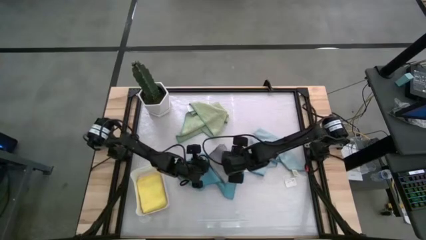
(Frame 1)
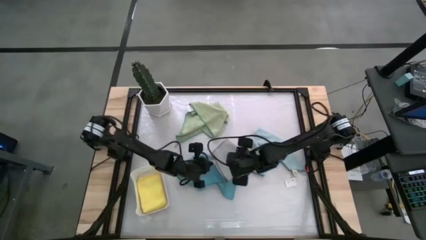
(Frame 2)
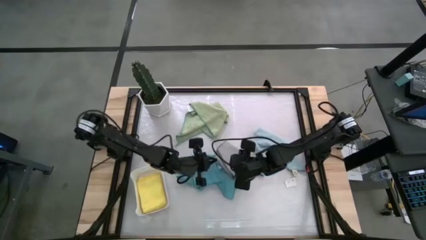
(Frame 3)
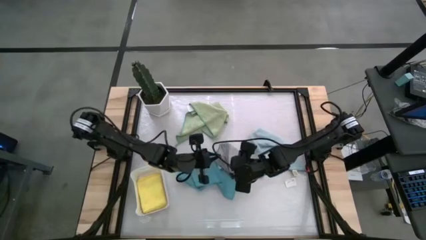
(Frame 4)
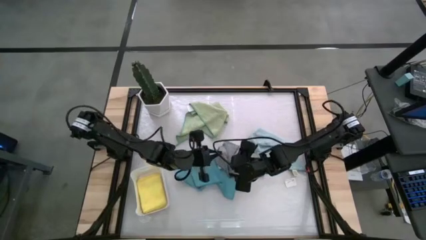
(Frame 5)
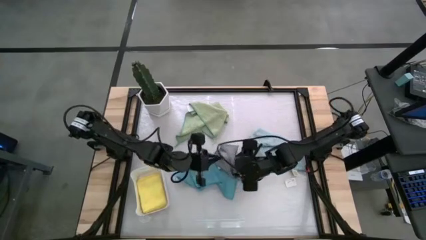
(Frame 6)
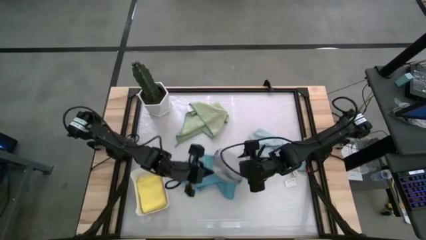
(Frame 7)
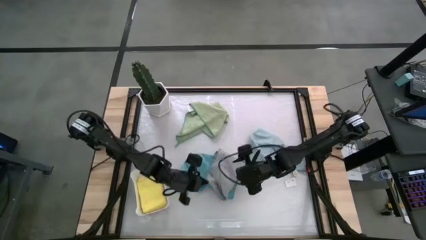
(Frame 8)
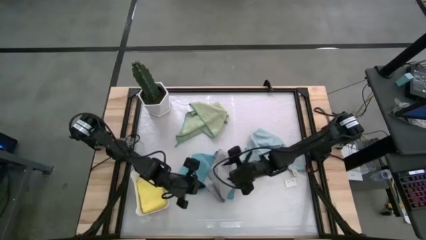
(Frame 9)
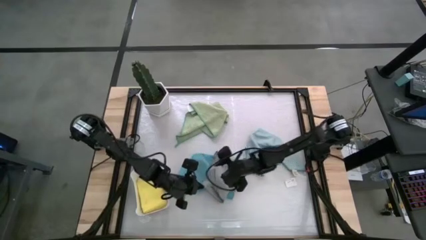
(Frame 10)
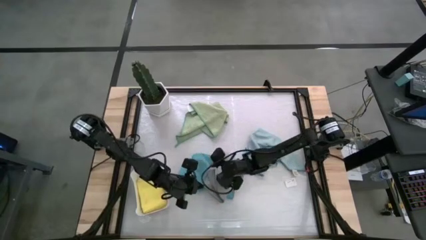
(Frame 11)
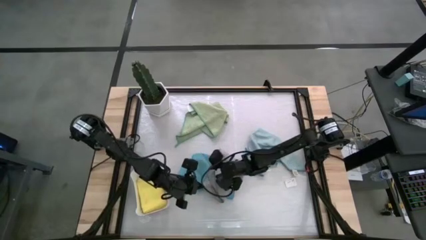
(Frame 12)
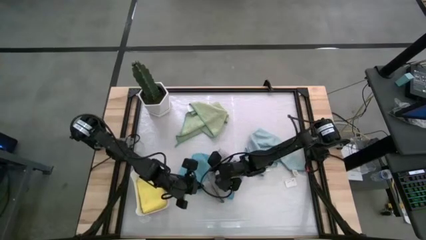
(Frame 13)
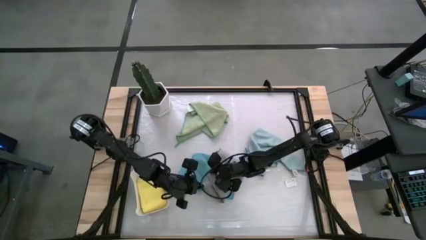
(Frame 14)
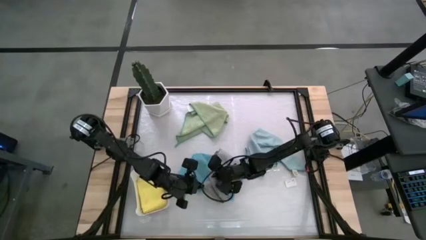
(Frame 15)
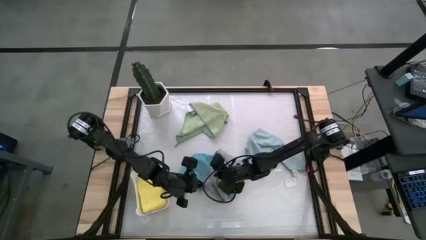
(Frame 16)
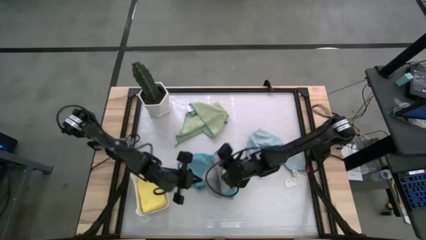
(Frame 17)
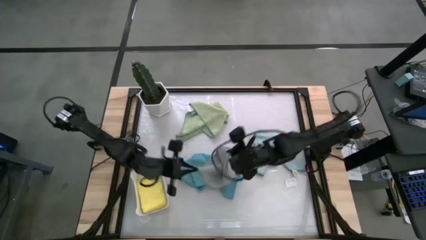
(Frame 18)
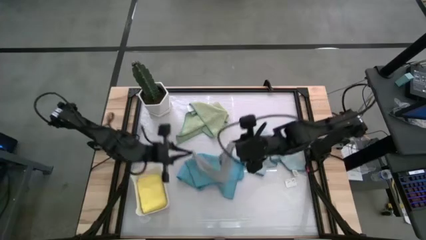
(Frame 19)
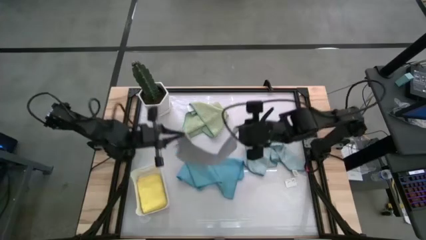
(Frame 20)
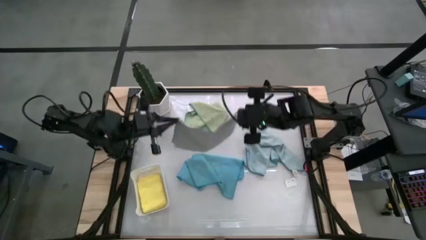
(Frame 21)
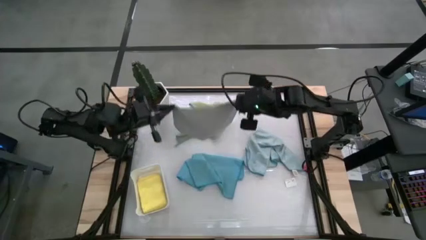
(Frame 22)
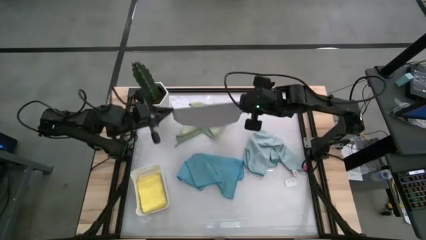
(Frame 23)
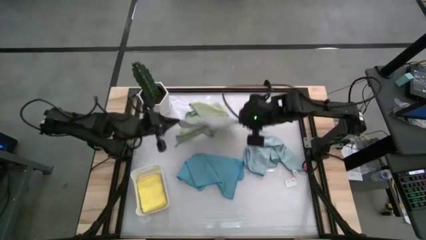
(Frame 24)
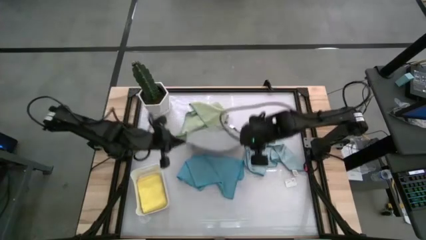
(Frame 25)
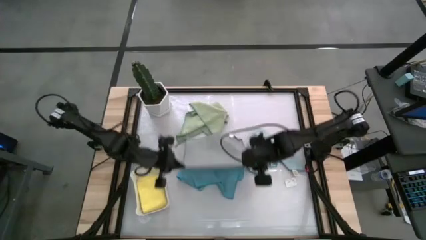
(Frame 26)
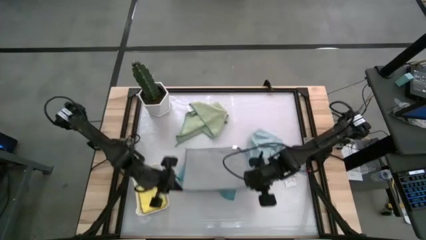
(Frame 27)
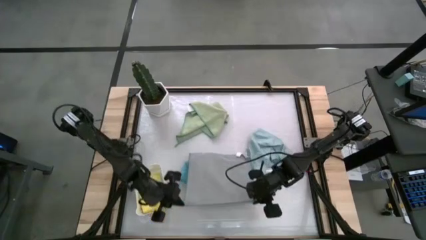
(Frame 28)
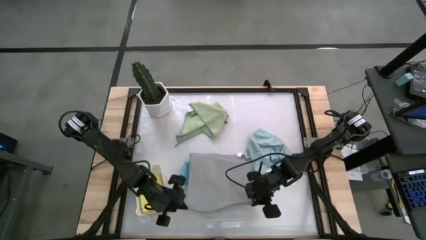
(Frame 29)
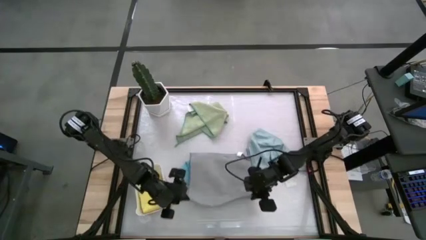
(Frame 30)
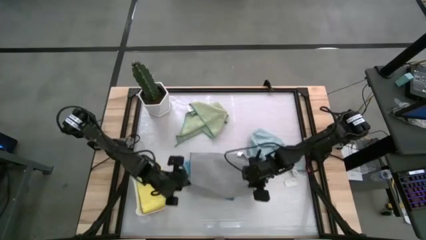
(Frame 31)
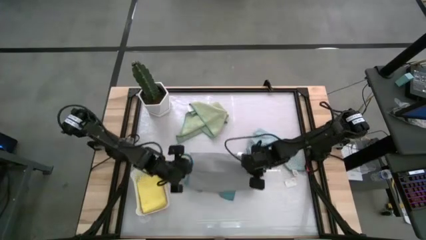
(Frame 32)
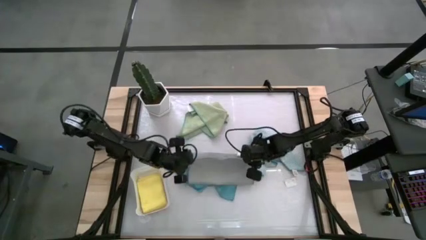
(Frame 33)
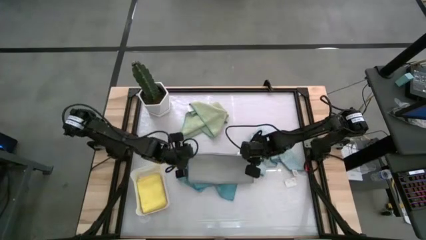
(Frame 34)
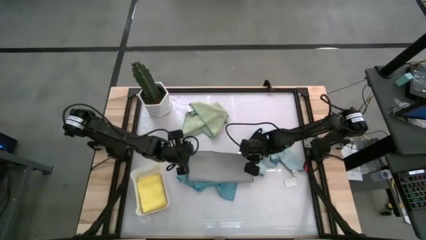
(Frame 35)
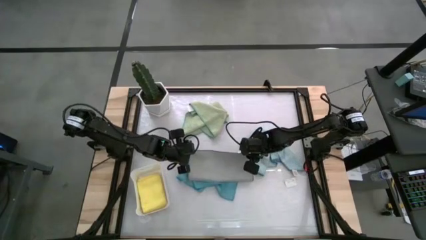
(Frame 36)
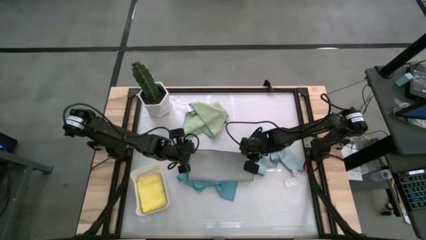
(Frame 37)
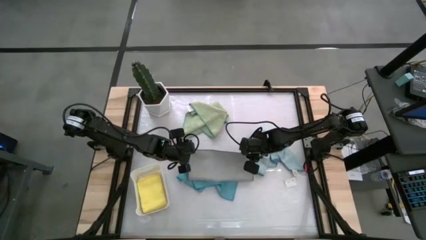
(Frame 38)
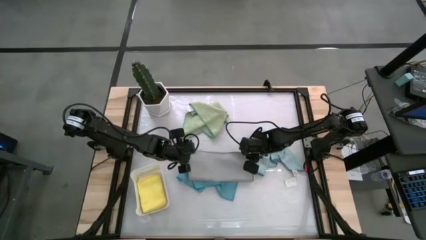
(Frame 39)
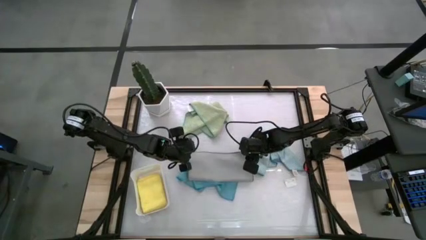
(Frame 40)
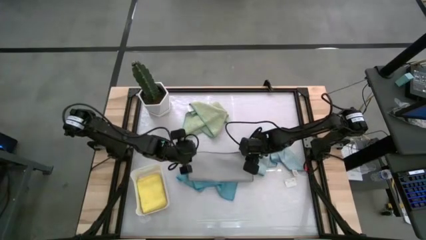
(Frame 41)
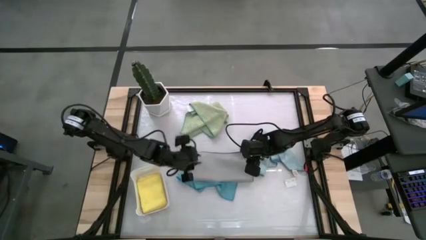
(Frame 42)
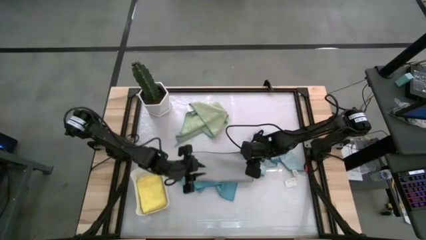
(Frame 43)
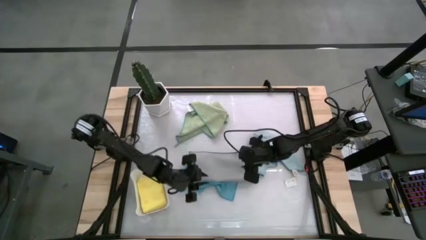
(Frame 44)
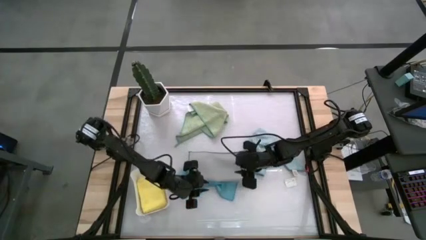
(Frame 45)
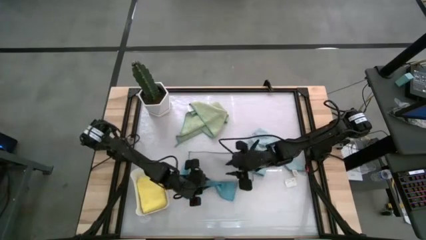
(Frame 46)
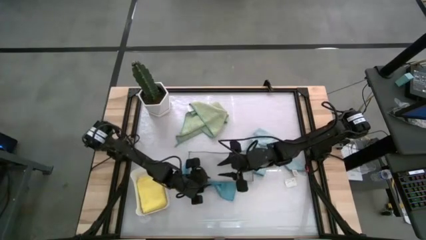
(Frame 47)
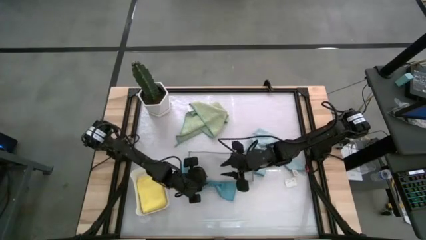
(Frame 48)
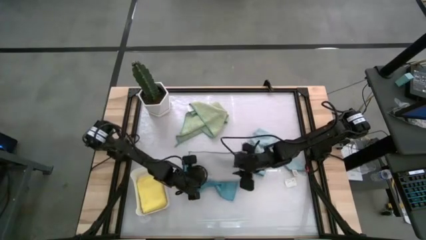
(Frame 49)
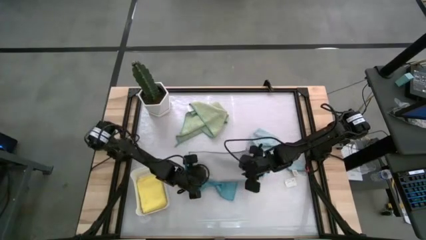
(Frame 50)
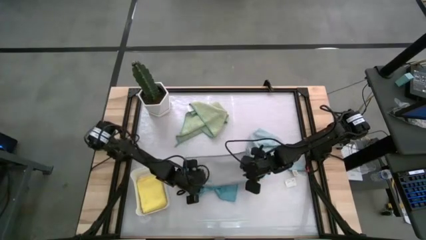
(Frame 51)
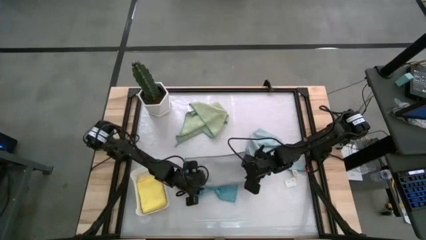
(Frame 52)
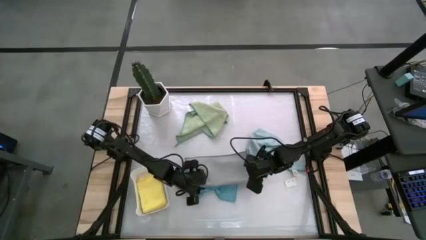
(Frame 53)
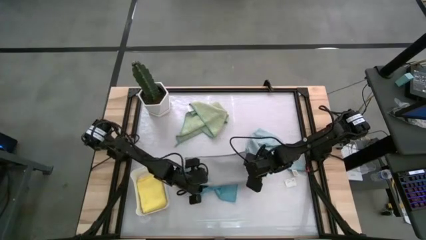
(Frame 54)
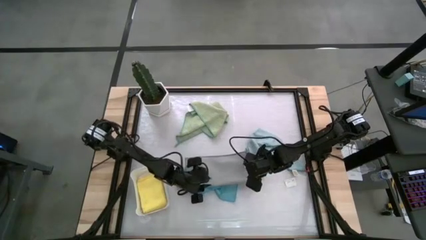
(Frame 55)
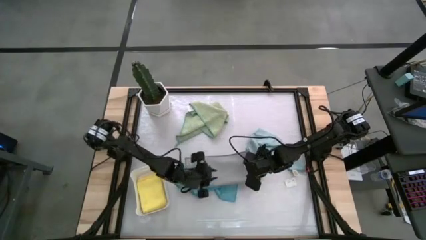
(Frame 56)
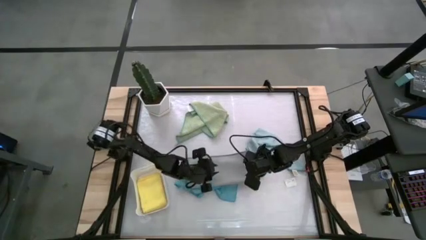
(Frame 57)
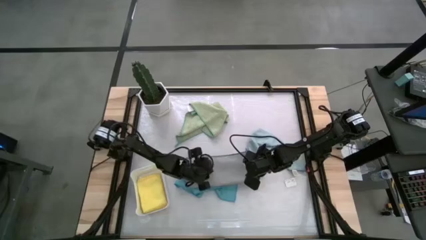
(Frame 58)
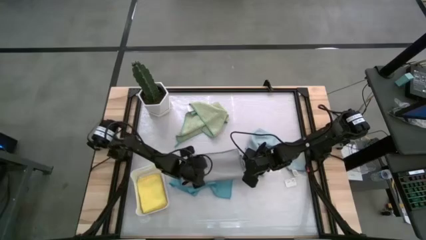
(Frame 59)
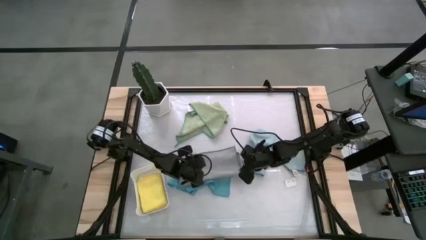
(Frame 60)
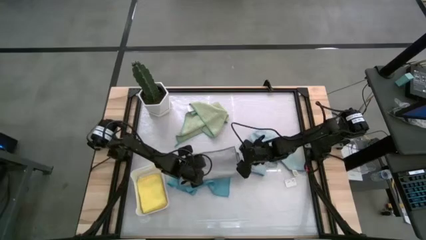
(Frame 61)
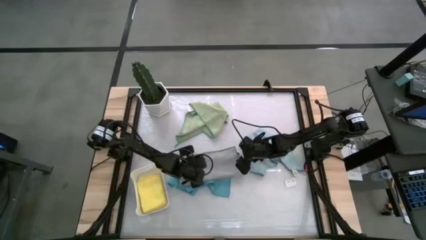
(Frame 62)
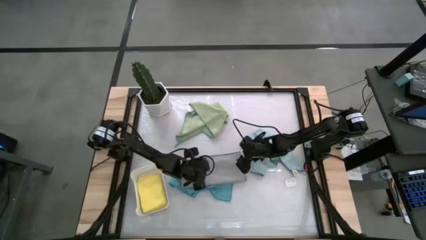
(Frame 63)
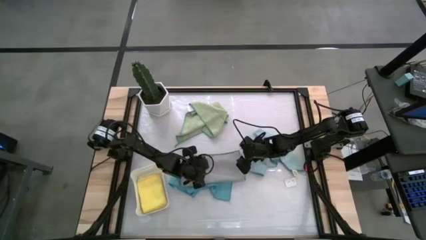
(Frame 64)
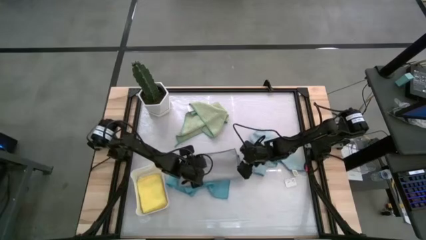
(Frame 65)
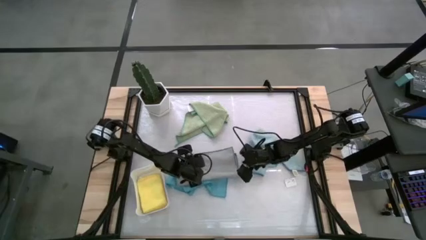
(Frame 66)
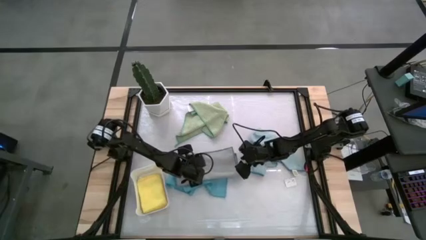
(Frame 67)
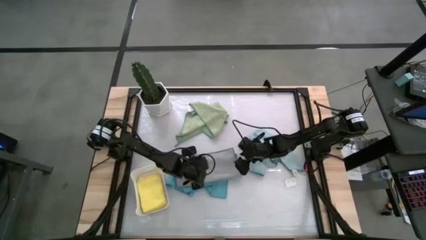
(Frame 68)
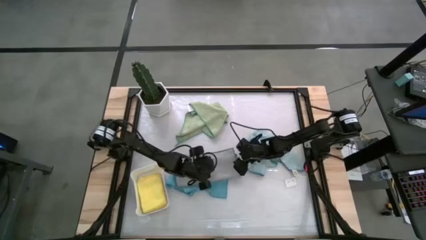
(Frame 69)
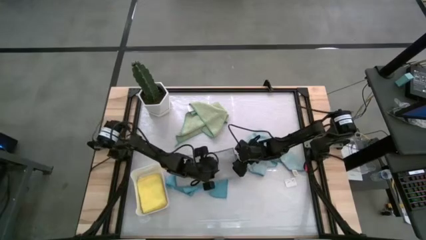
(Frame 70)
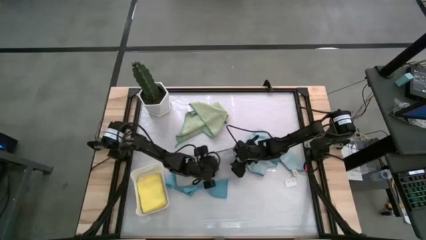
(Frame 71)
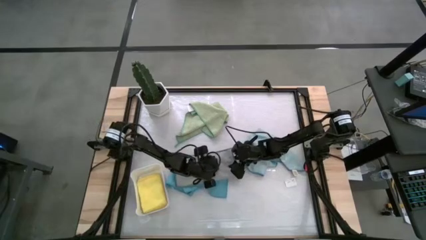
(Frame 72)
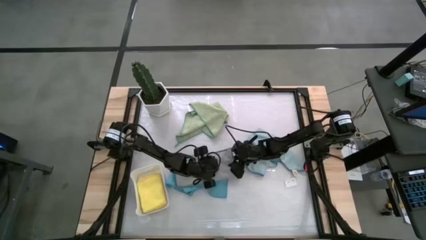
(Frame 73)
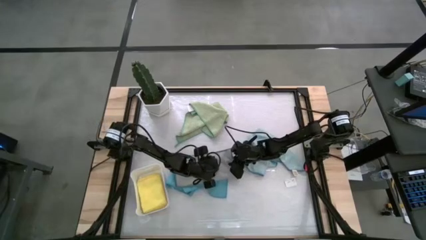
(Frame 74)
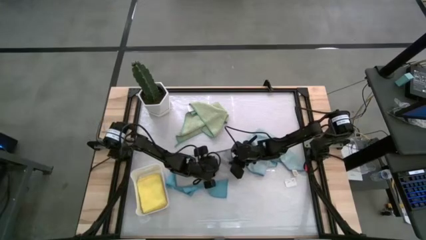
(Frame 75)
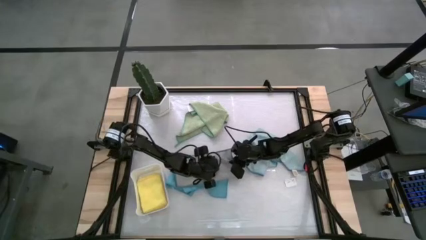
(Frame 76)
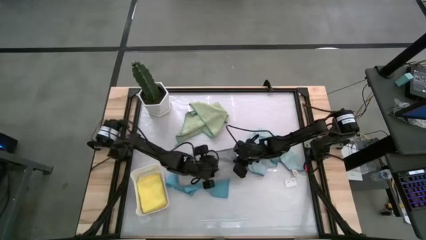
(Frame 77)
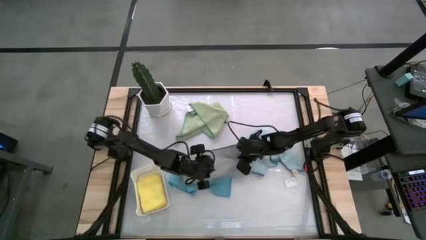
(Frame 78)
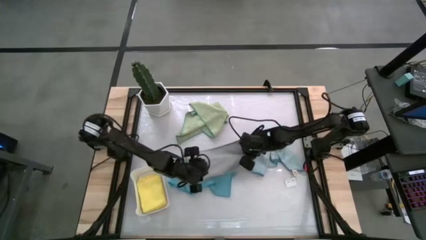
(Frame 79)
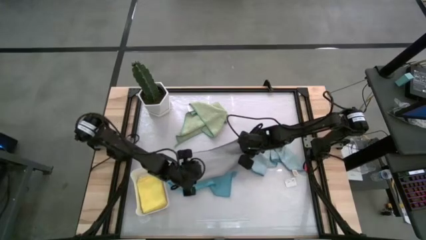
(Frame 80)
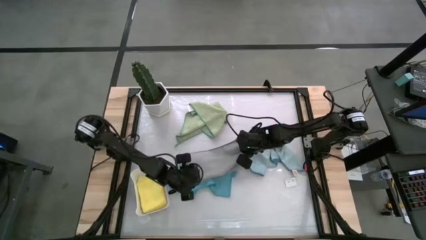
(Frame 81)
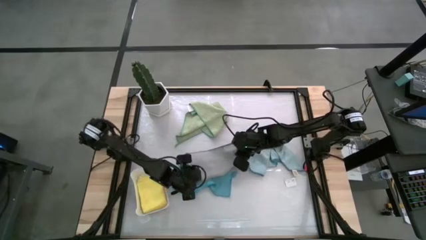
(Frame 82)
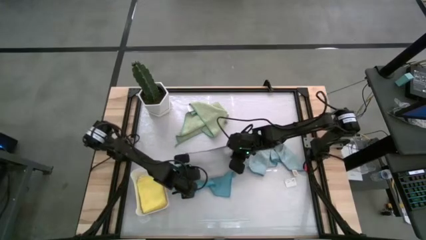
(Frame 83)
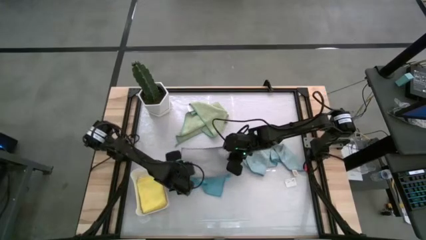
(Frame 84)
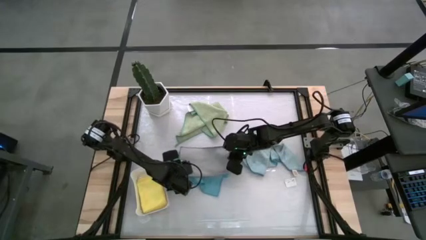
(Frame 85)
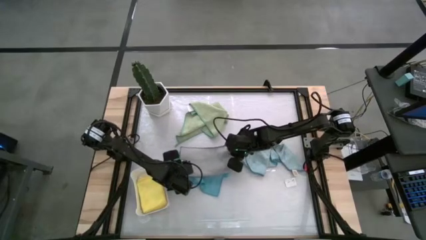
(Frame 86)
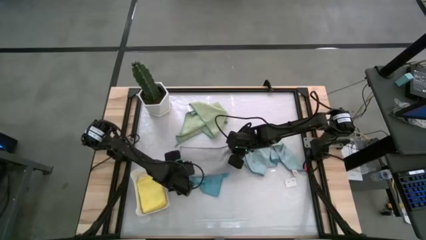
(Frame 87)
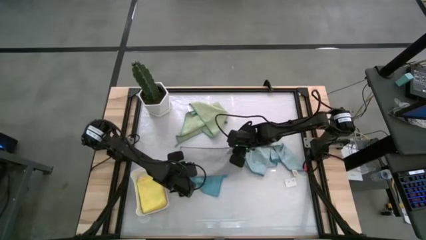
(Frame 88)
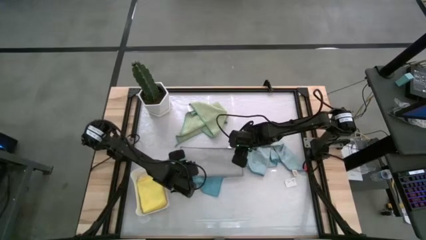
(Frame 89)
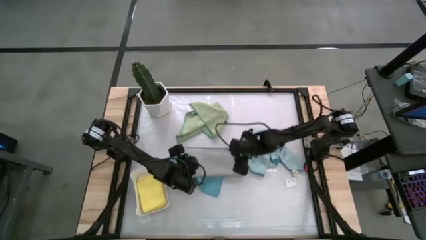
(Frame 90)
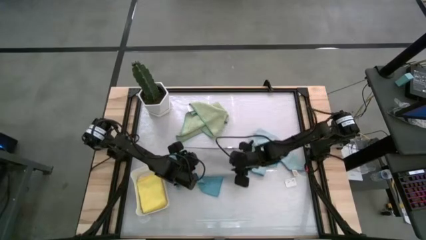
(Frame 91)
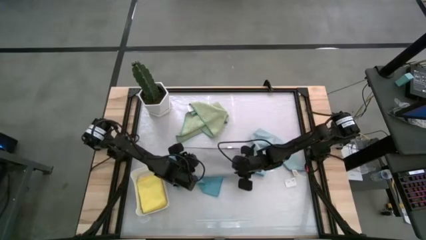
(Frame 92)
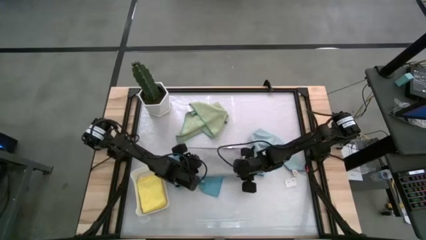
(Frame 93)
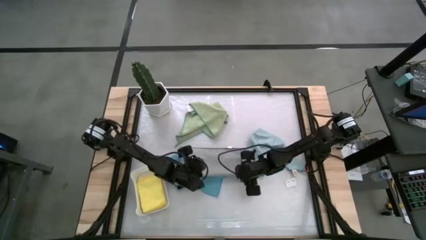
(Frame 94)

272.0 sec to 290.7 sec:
Task: Fold microfiber towels
Fold the gray microfiber towel
